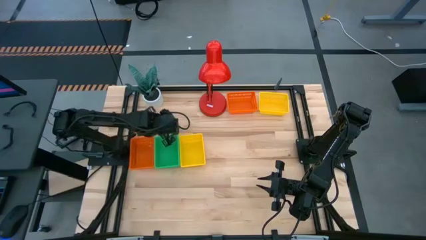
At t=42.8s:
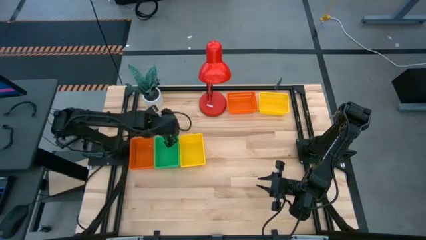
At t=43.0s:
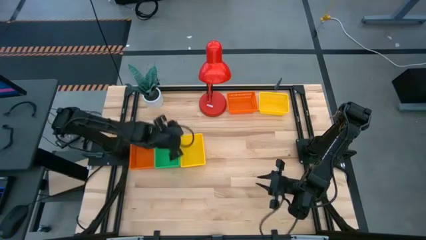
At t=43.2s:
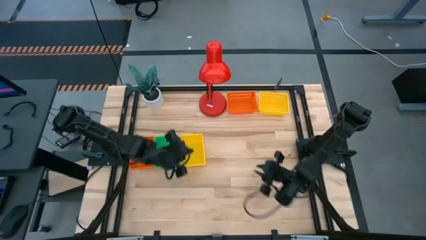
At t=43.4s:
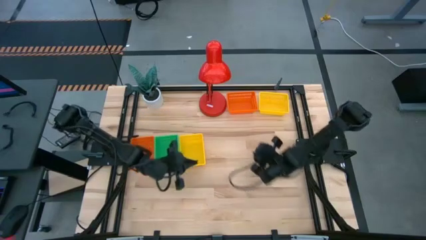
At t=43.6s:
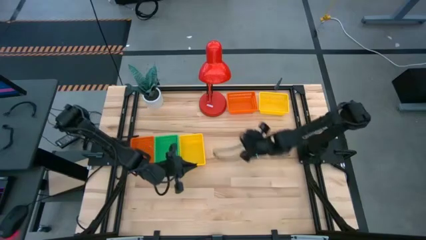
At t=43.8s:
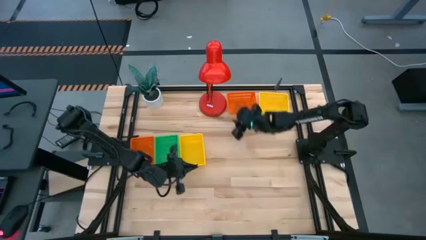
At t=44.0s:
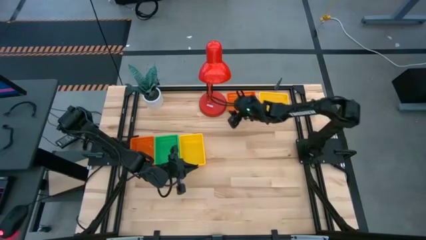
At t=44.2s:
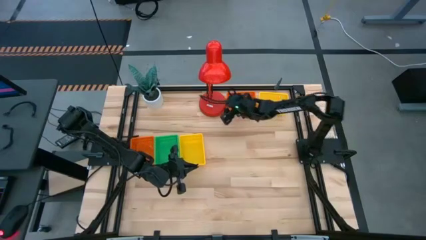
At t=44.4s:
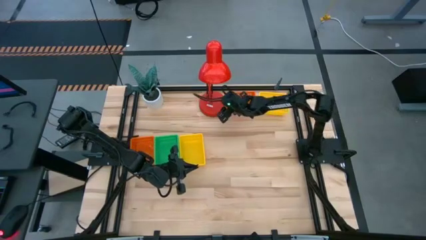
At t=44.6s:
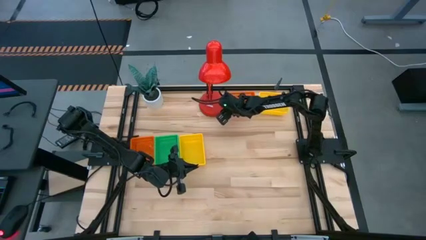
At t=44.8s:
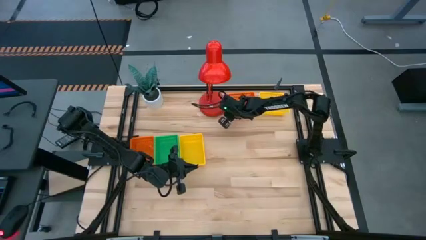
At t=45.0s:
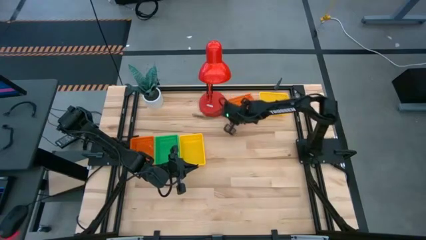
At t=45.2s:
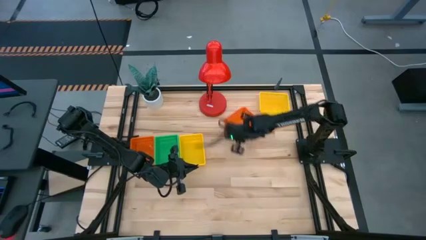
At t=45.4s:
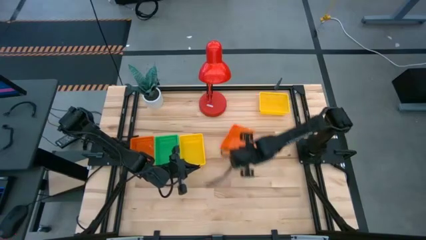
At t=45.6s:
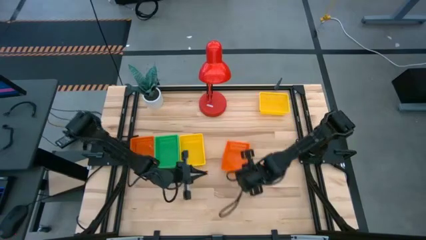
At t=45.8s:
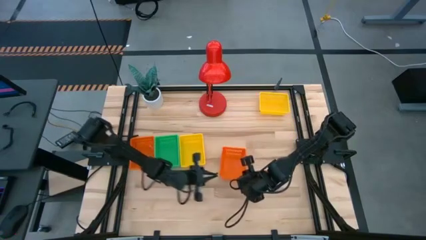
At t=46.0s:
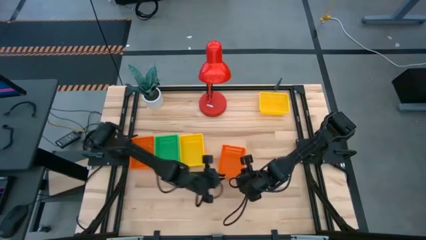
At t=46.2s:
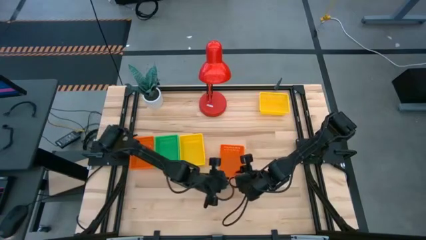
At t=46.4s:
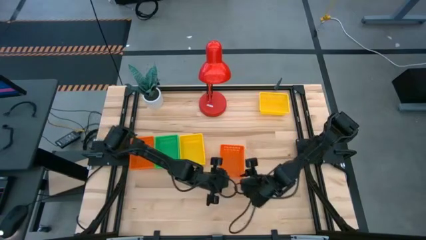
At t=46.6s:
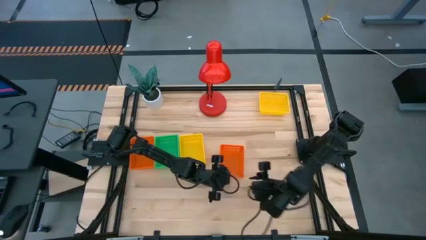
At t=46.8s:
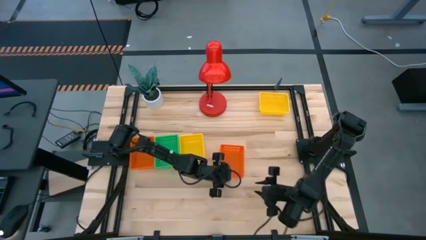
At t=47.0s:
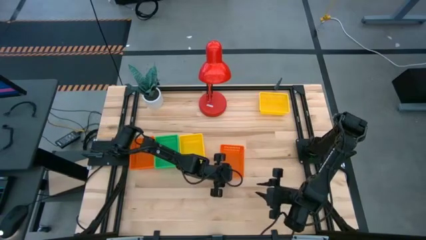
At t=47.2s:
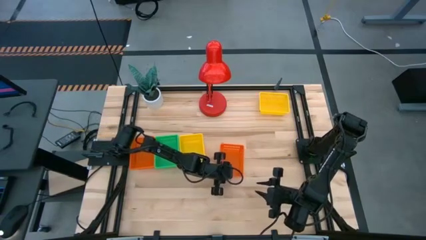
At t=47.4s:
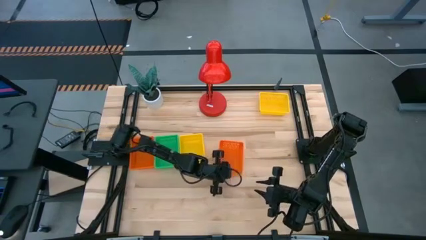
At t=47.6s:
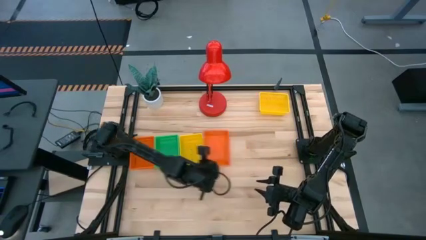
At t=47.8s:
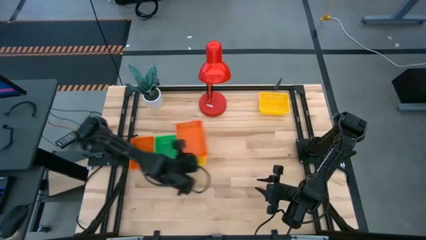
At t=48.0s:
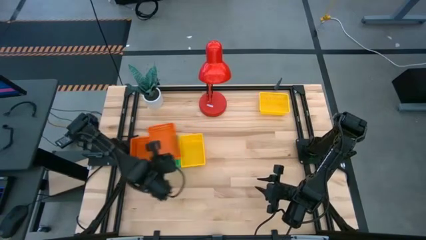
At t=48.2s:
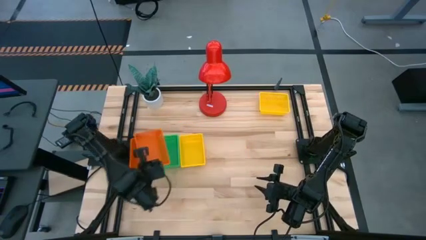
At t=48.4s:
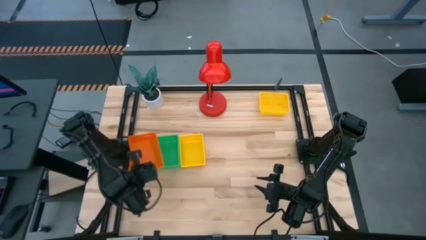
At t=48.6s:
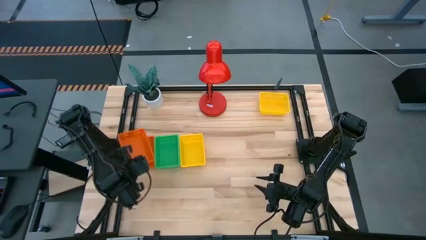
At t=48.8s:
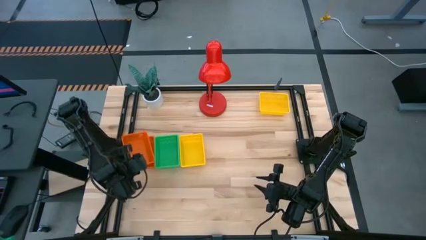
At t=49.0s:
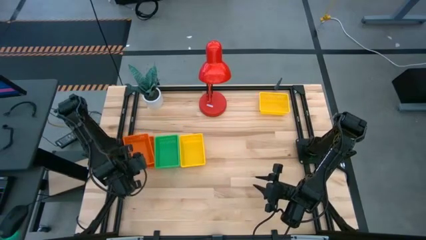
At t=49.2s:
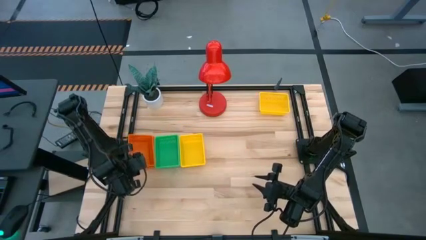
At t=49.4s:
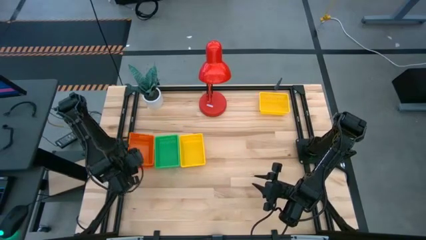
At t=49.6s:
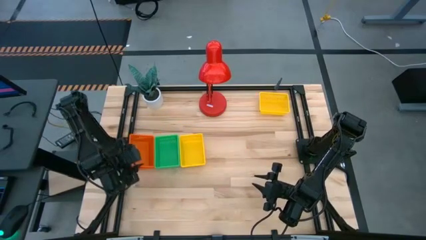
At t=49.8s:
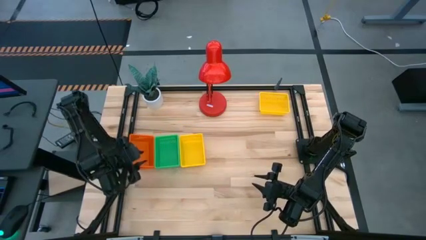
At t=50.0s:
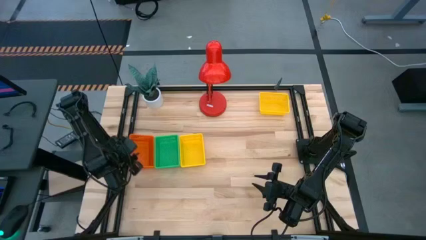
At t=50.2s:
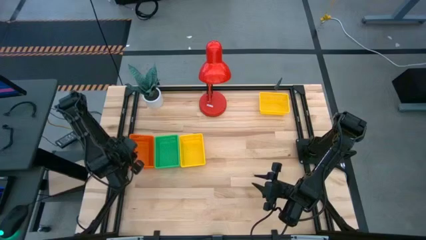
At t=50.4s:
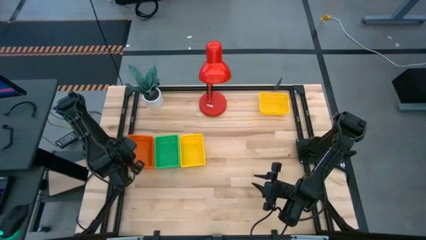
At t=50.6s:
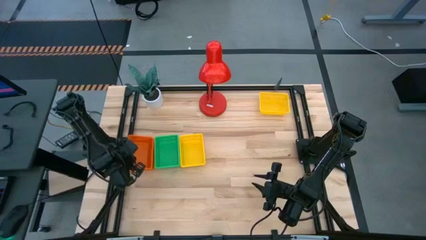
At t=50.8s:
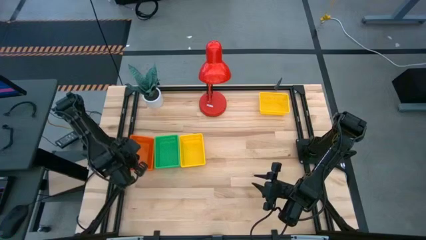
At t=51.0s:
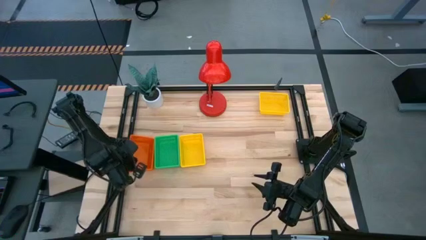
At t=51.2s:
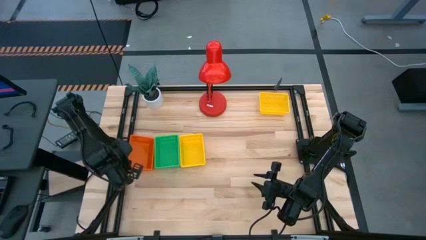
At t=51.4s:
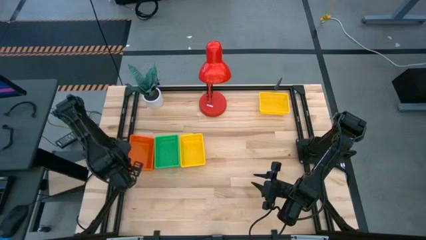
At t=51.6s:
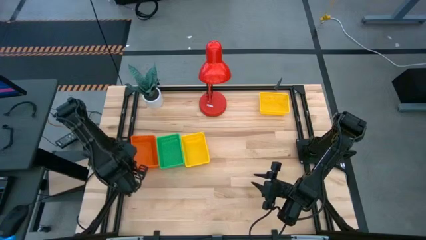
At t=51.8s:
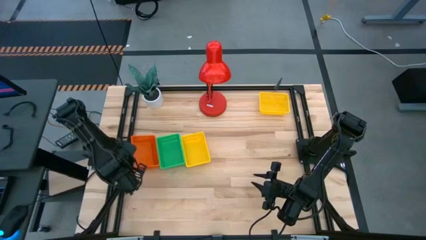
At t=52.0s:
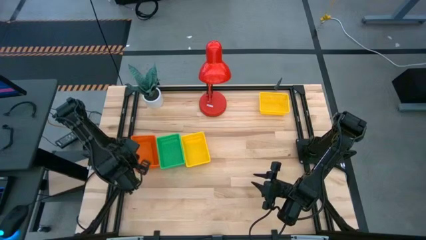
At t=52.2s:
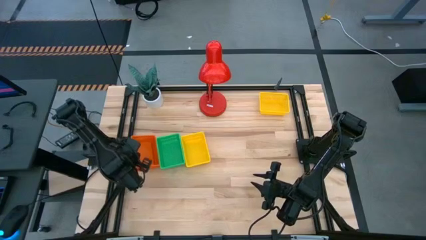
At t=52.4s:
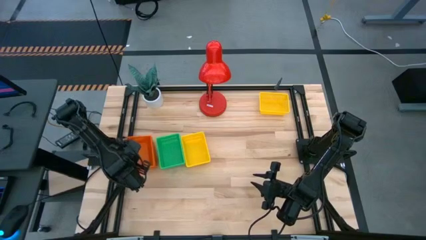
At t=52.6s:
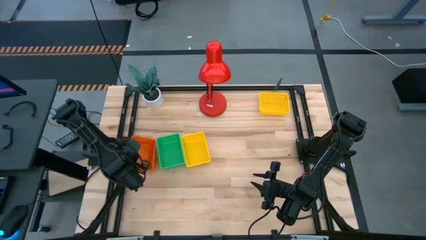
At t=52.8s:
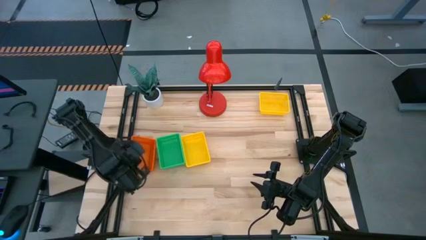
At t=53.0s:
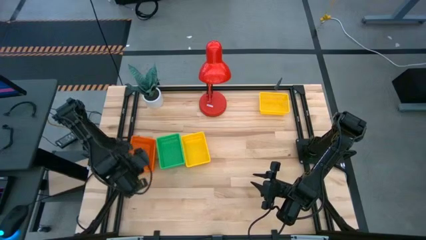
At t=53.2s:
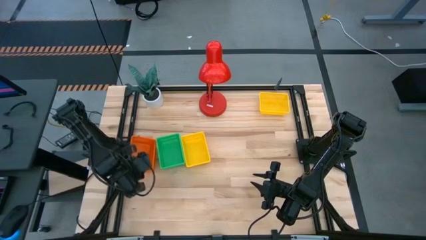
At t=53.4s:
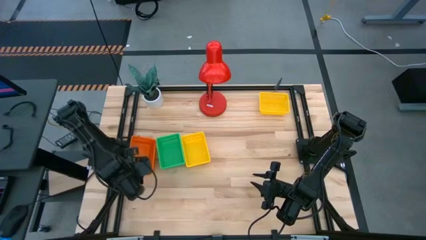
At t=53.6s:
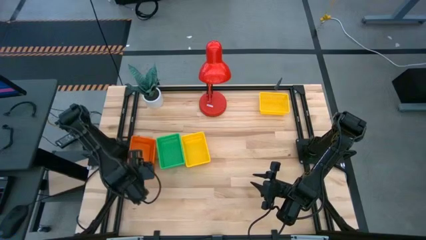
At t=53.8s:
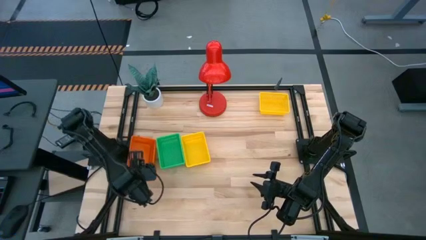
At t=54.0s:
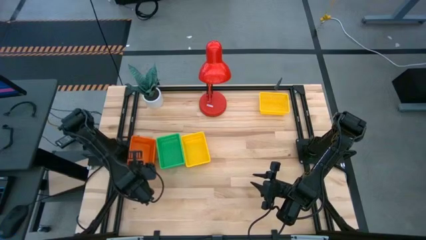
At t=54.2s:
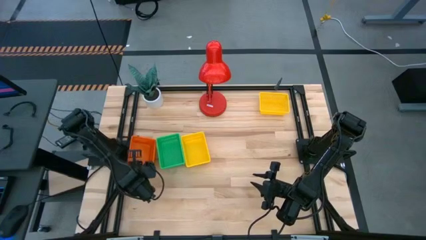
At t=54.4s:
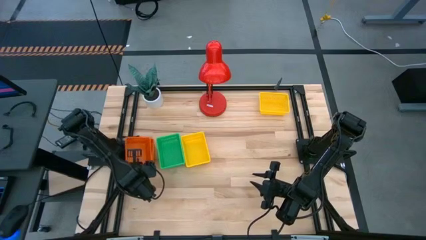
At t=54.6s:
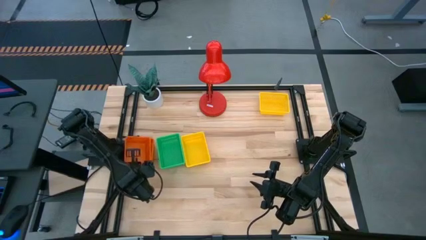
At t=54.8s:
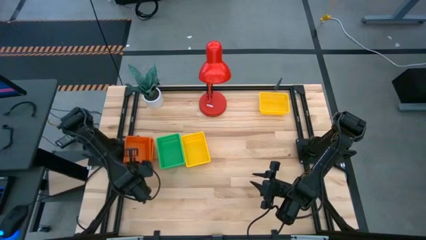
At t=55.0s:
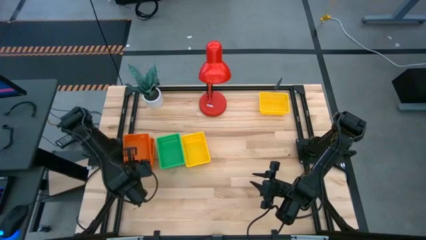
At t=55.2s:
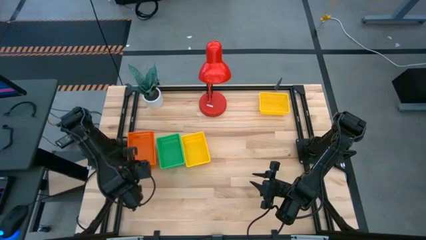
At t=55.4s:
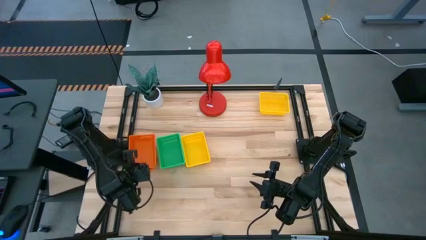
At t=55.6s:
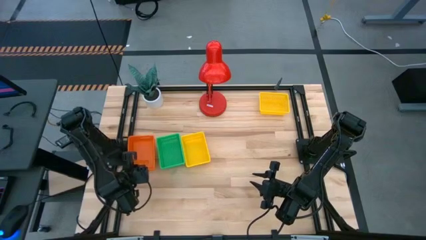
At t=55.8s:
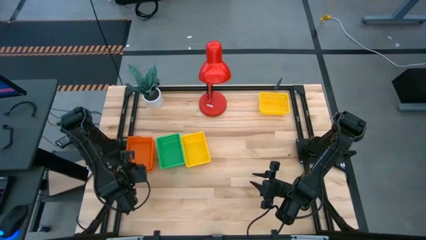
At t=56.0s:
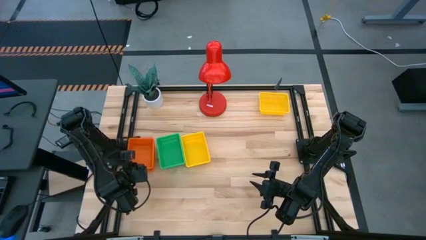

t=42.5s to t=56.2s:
Stack the top orange bin on the bottom stacked orange bins

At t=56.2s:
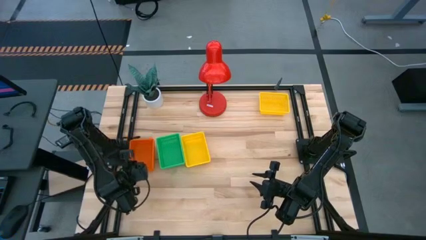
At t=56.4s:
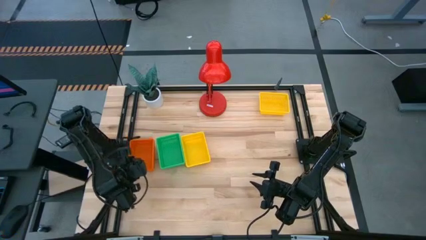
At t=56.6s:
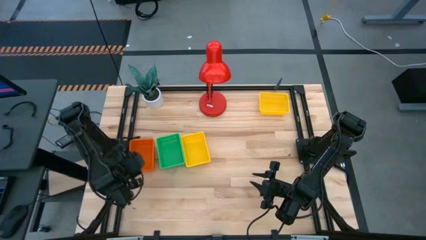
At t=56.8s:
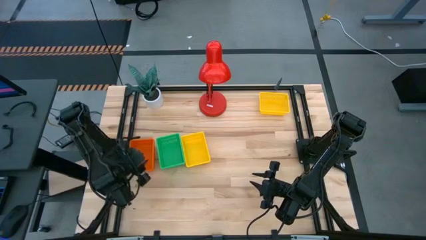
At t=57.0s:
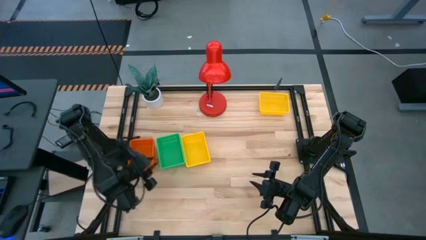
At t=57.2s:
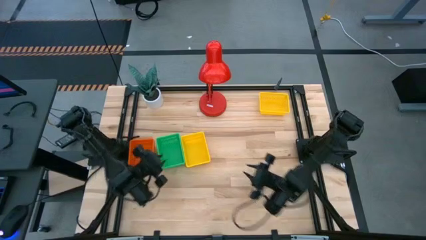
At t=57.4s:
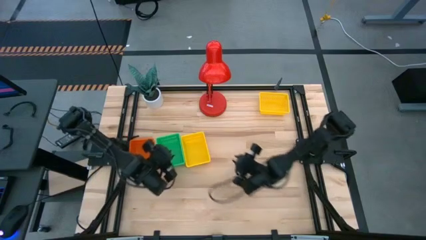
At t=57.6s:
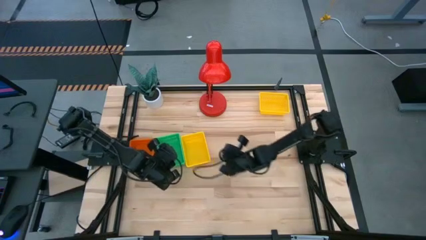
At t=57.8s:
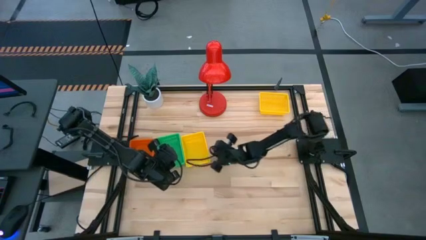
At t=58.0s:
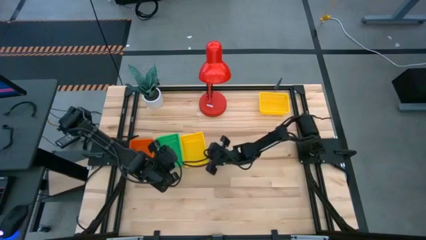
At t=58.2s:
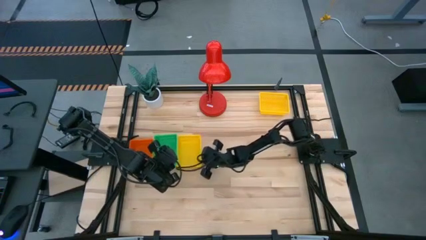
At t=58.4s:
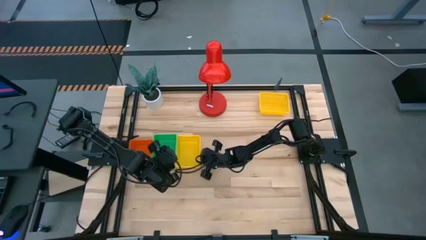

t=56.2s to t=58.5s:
Adjust the stacked bins
